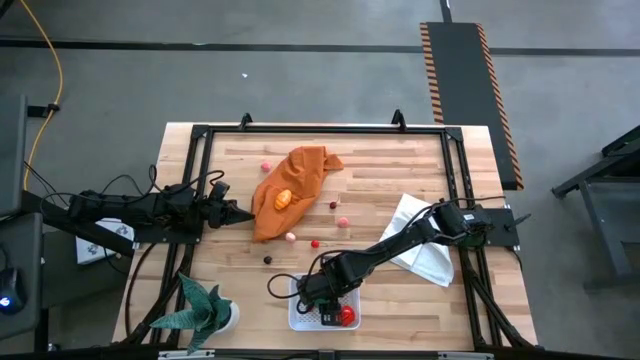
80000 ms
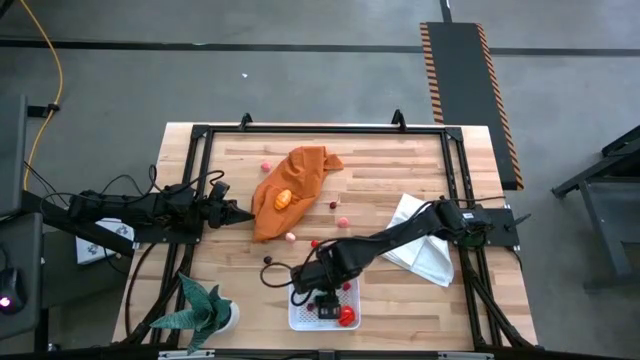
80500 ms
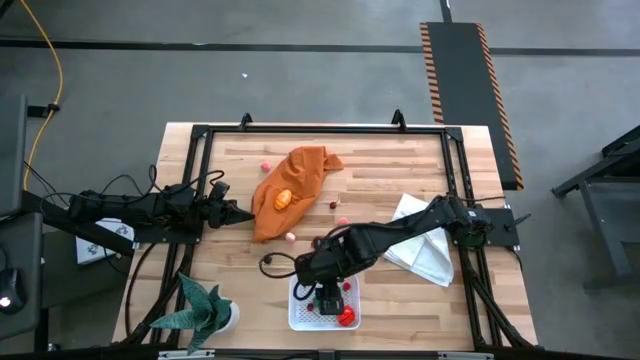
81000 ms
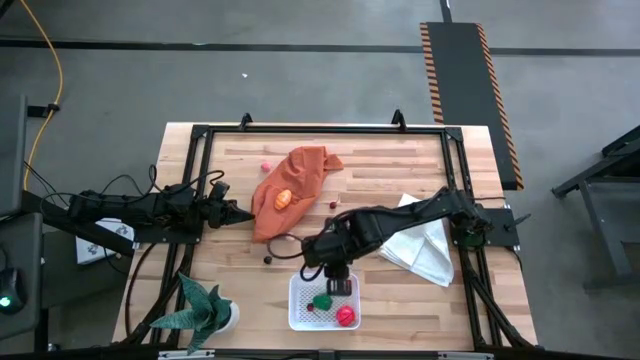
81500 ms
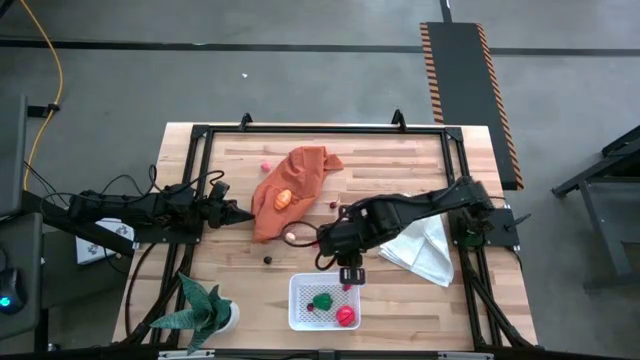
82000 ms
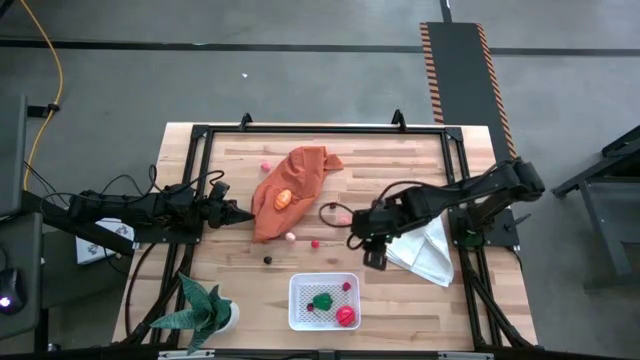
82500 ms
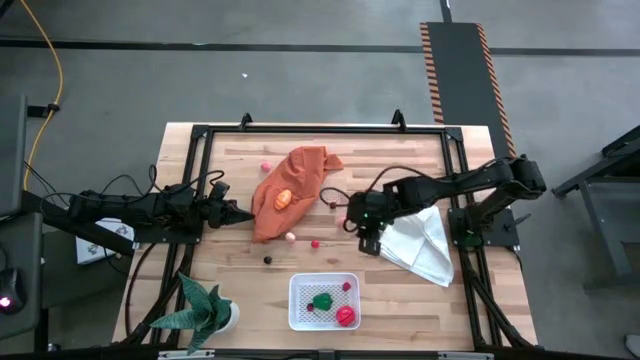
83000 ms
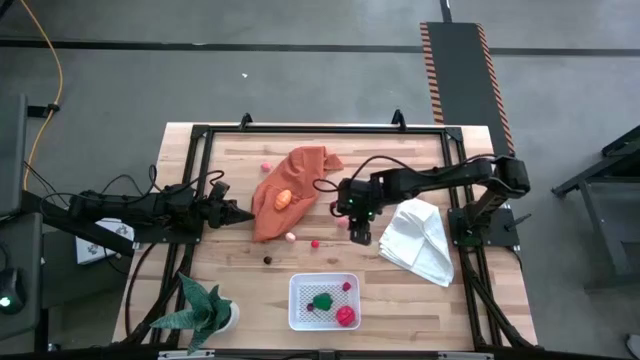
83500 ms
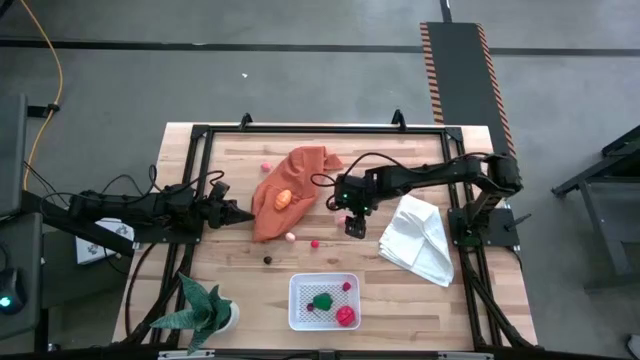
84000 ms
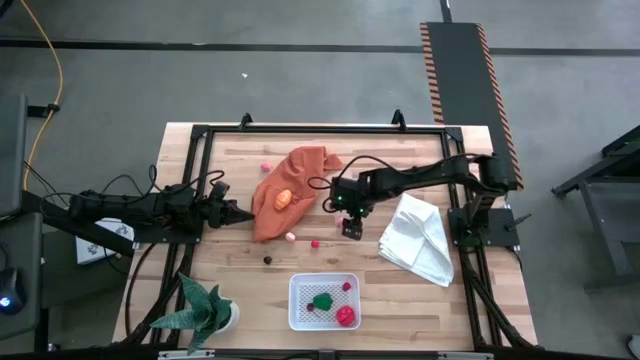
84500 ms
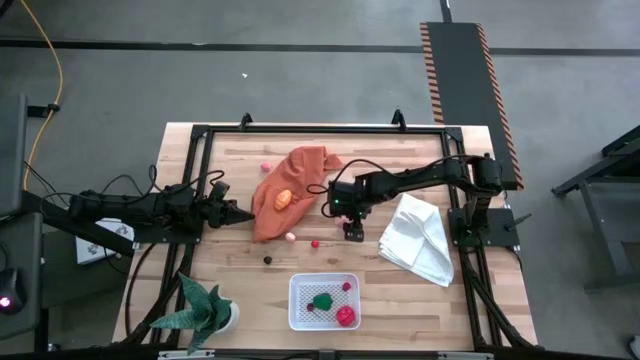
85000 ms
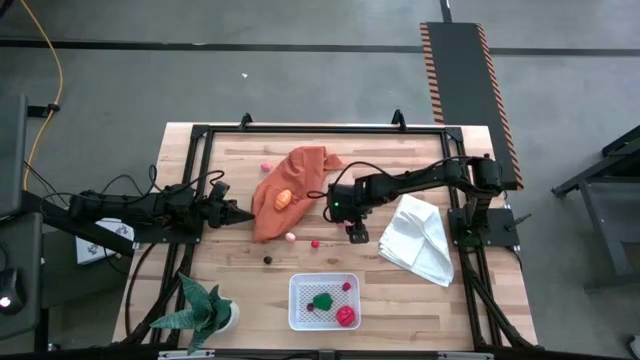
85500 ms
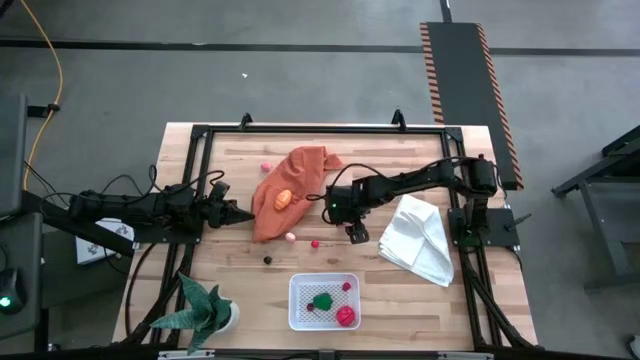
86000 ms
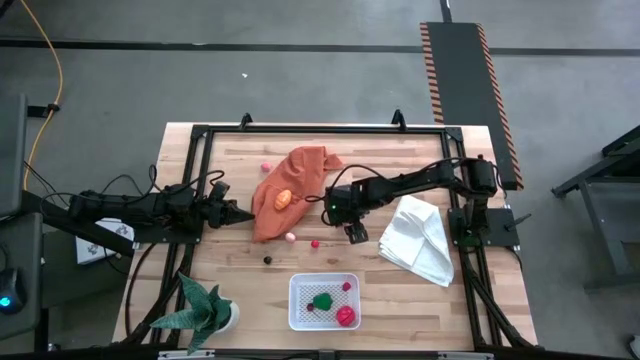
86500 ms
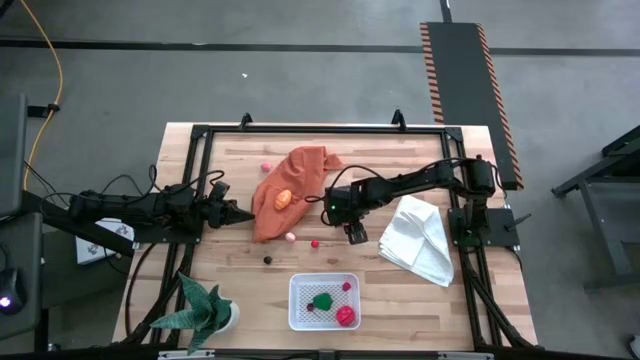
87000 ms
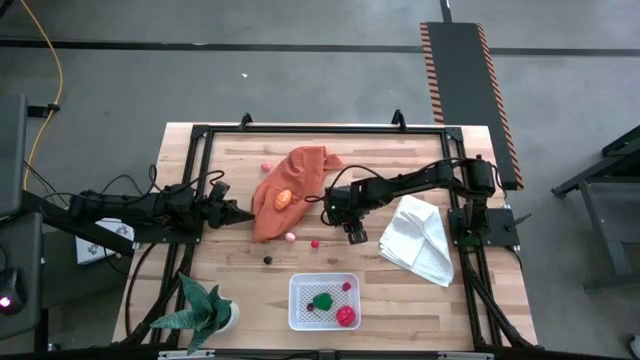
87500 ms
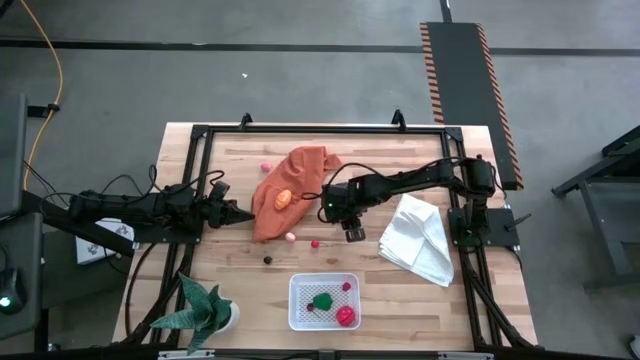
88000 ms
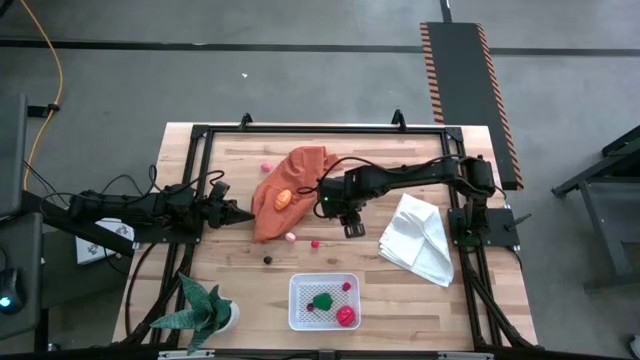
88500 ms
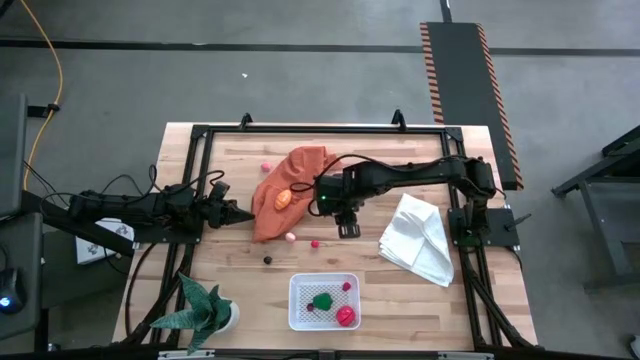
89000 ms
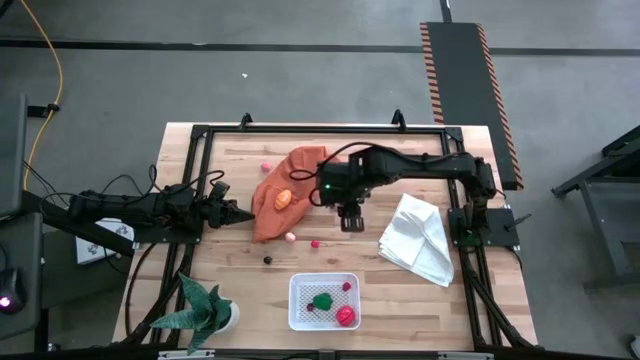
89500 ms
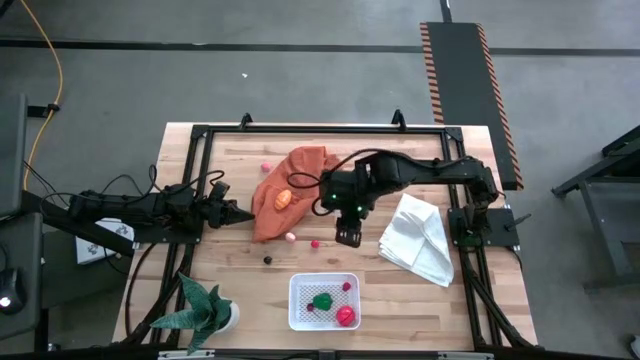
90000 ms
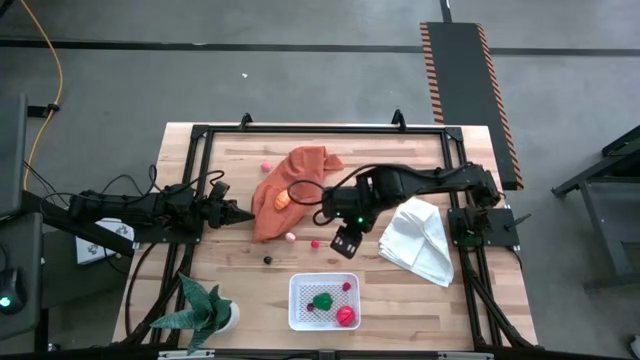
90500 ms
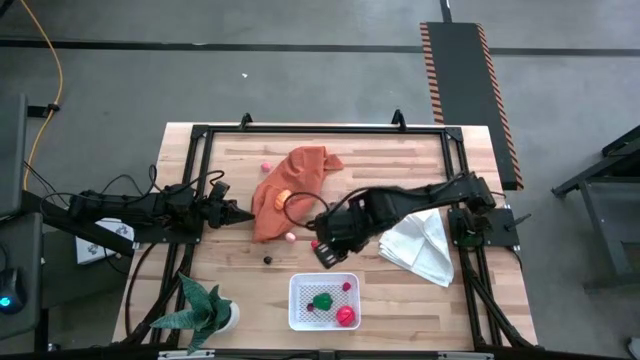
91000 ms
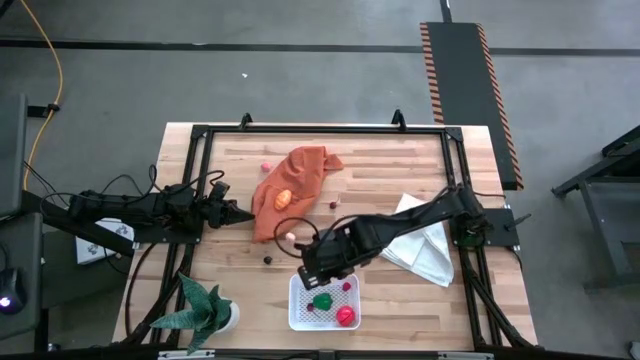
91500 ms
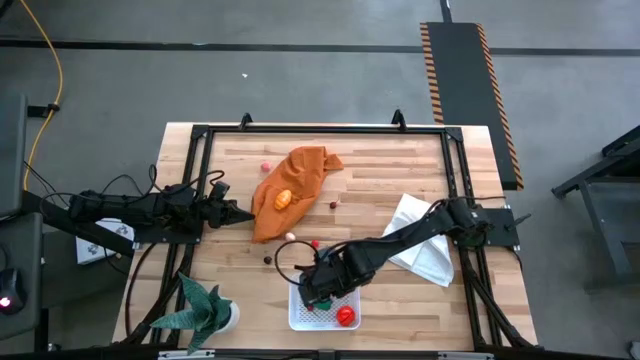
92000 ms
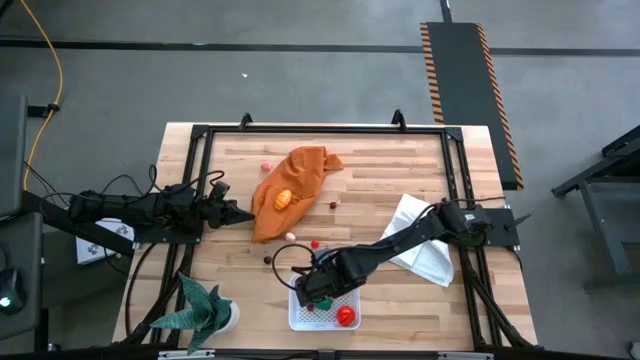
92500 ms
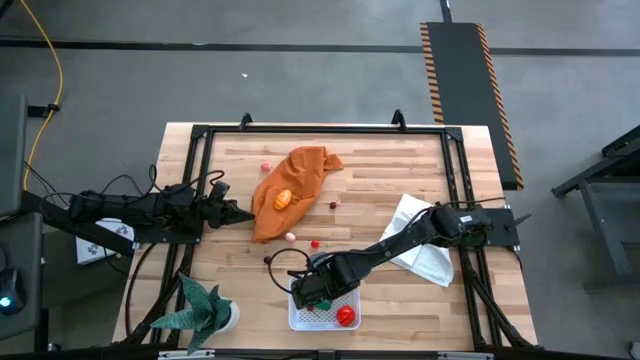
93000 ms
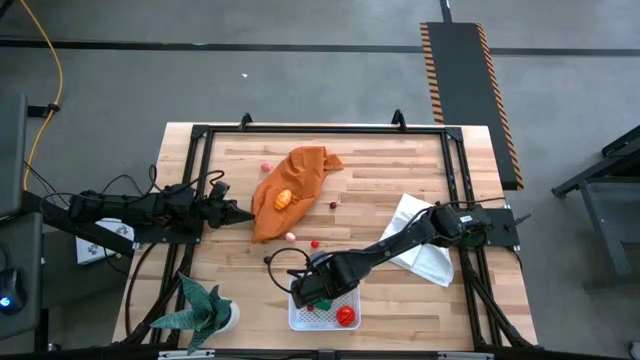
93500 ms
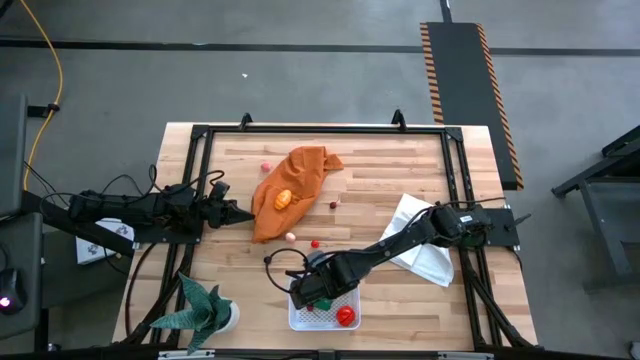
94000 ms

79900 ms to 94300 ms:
Task: Pick and placing Produce into tupperware
Put the right peach into the white bin

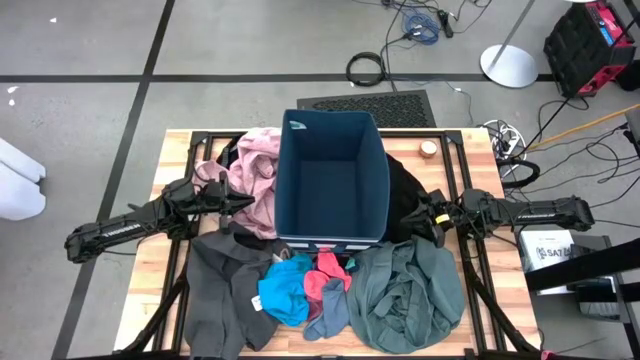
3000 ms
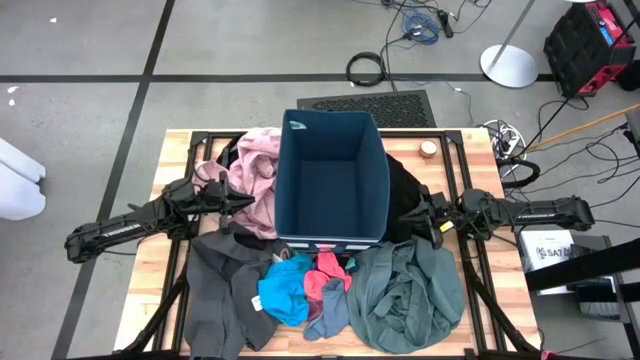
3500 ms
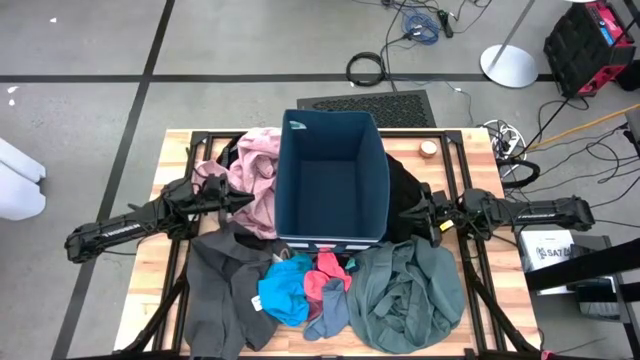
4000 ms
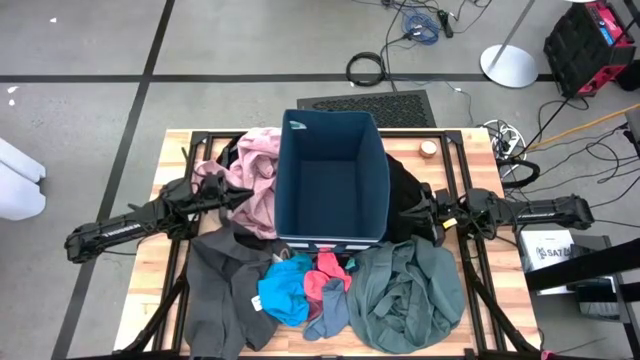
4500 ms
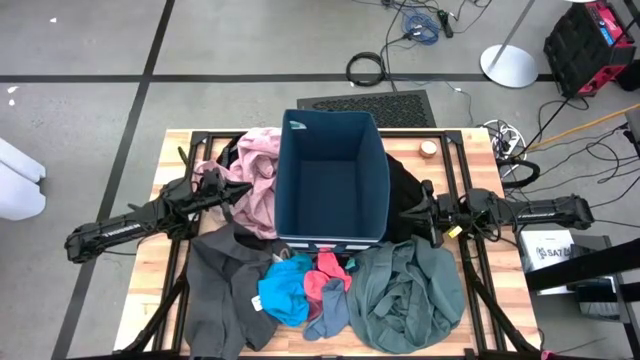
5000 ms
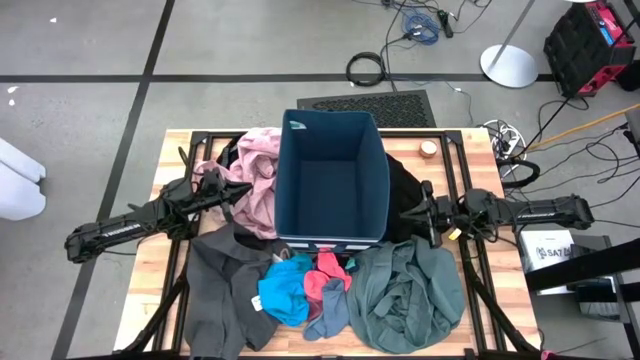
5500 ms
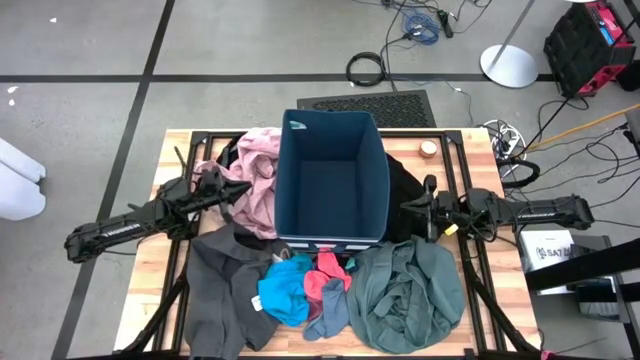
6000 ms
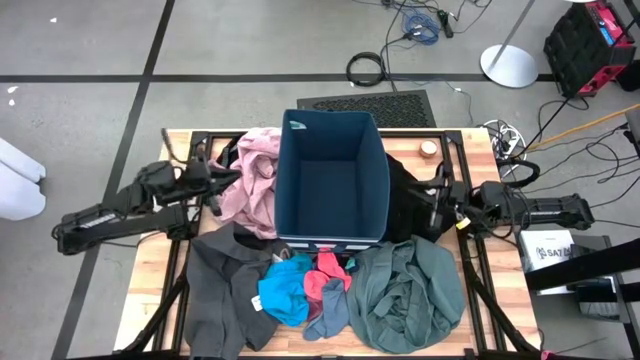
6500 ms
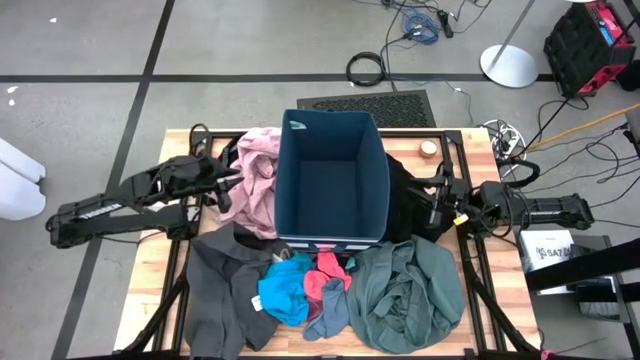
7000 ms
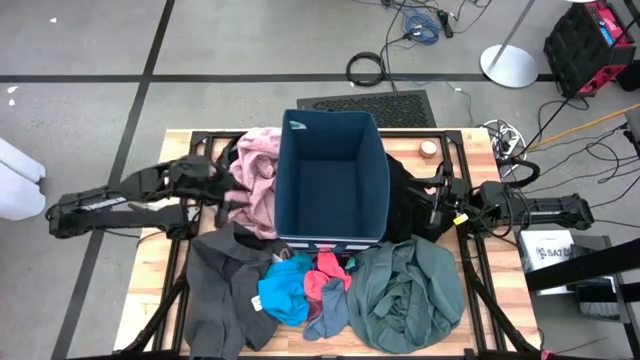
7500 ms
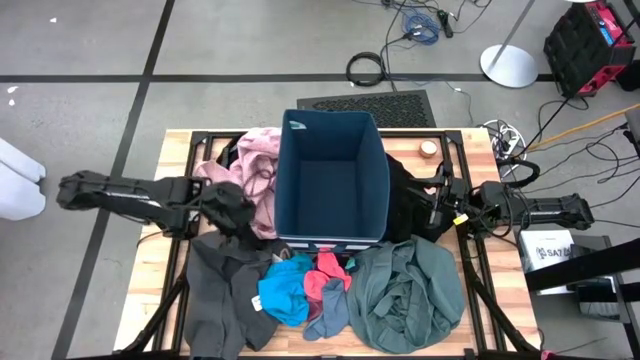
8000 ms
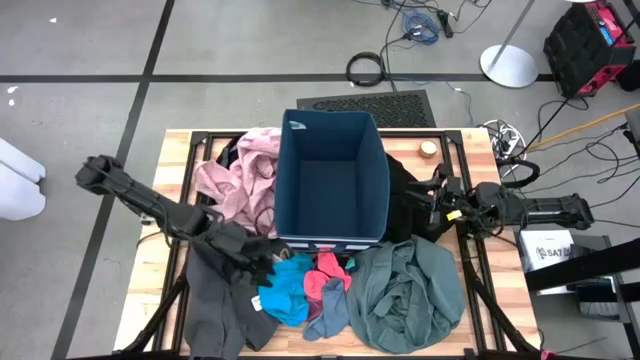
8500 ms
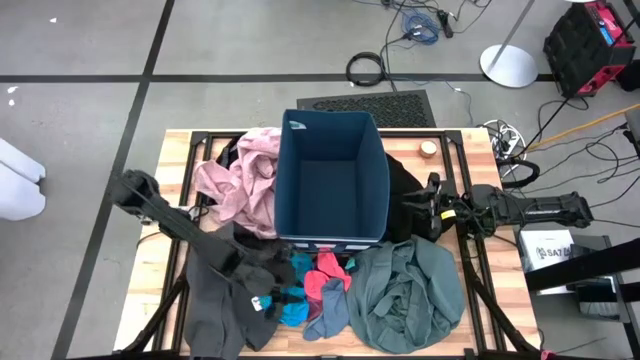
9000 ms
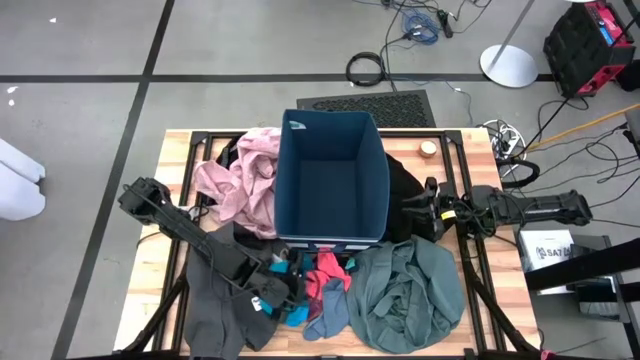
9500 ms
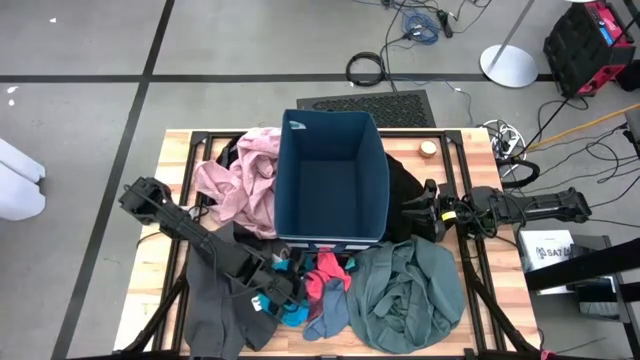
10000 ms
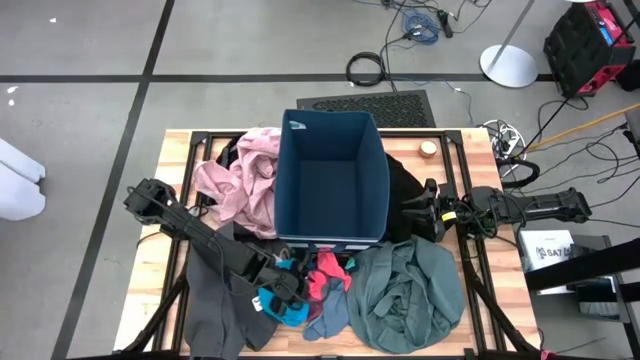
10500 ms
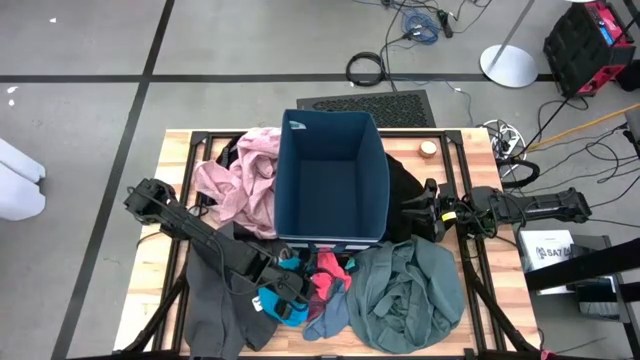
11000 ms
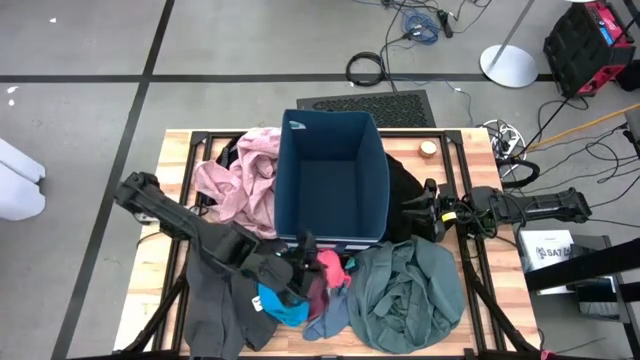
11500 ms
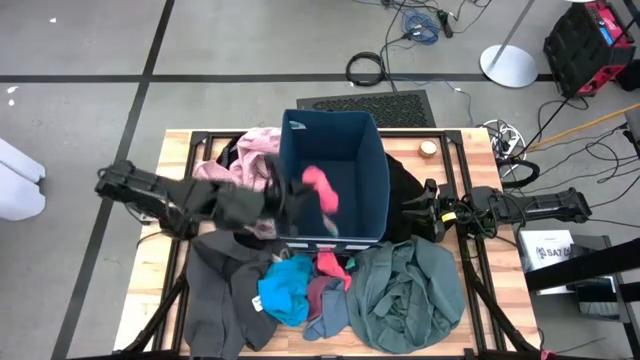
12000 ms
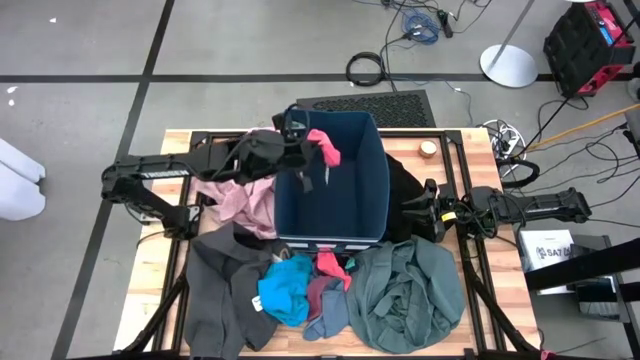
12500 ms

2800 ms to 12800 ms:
Task: Sort clothes
Put the pink sock into the blue laundry organizer
